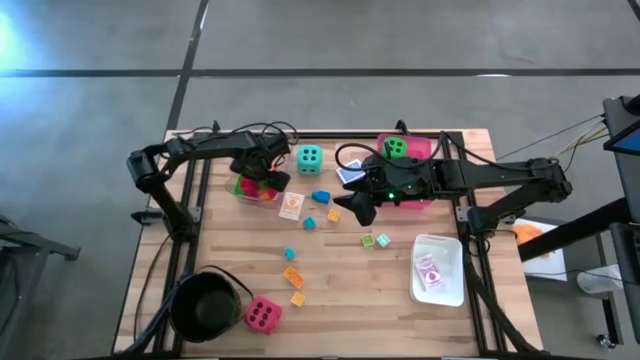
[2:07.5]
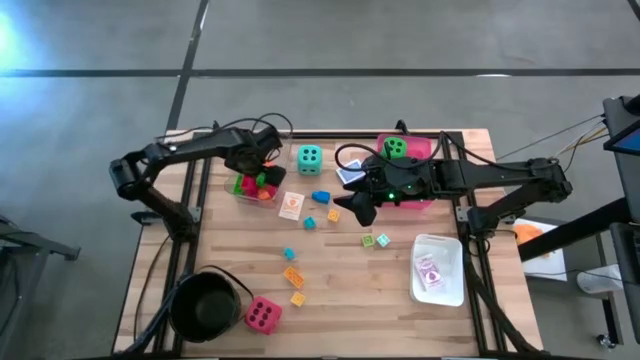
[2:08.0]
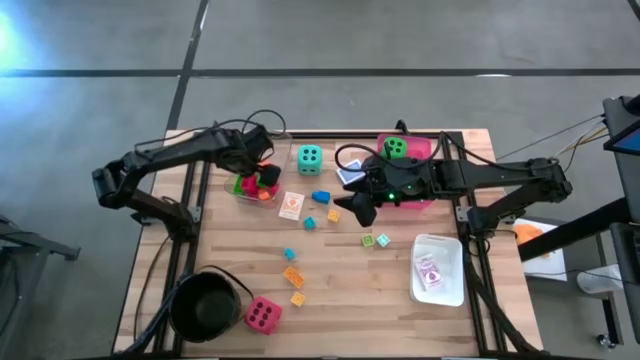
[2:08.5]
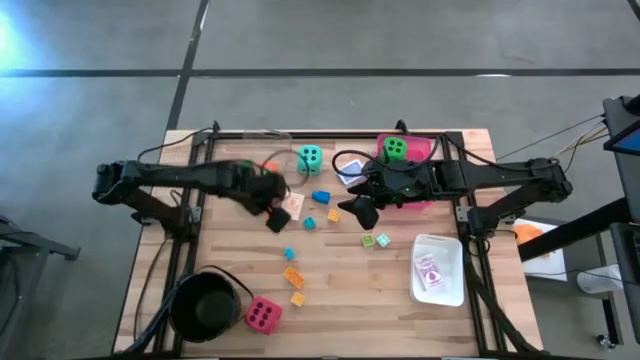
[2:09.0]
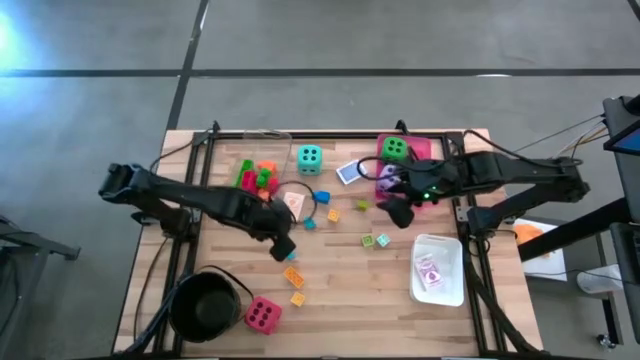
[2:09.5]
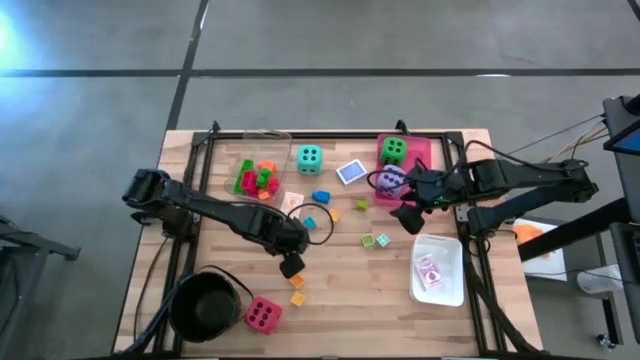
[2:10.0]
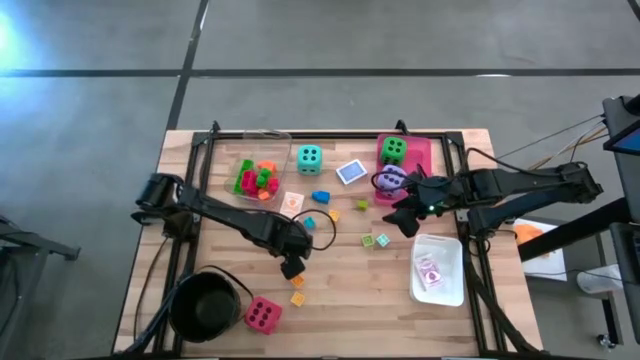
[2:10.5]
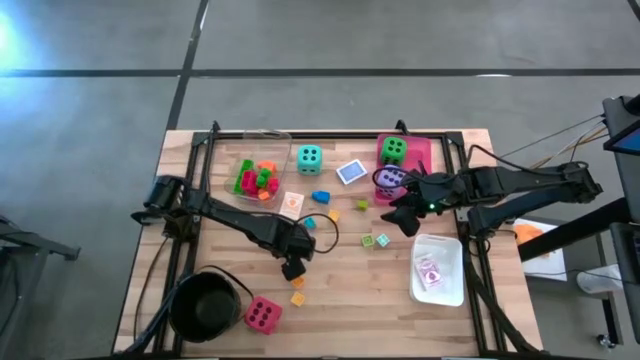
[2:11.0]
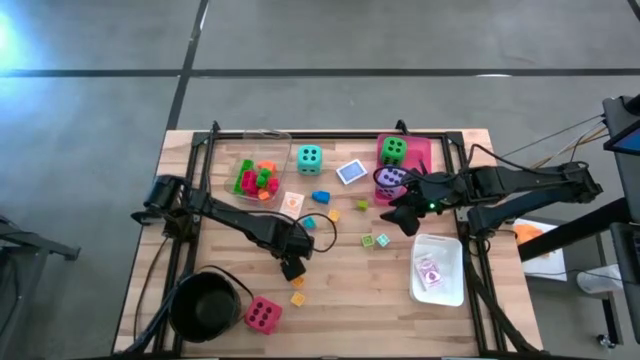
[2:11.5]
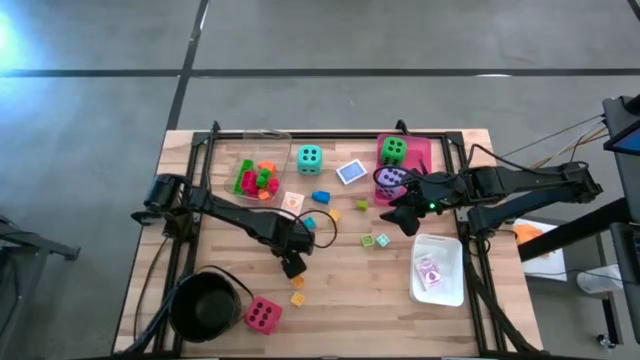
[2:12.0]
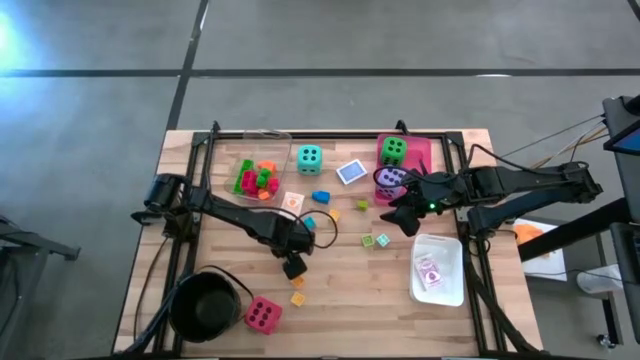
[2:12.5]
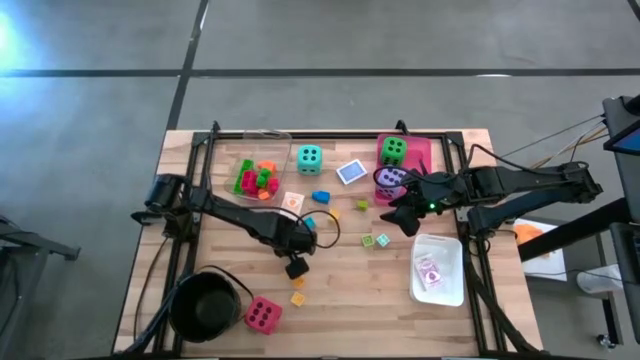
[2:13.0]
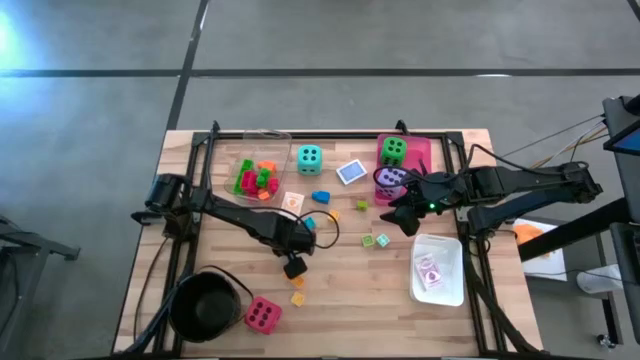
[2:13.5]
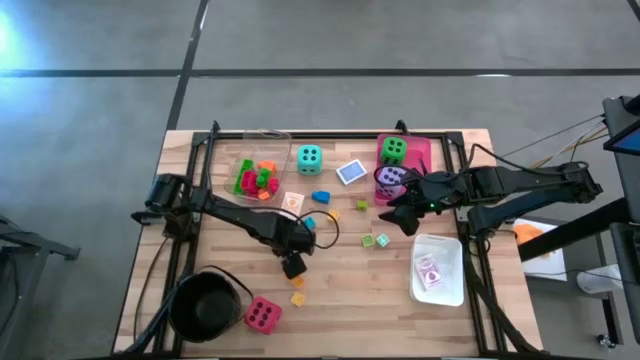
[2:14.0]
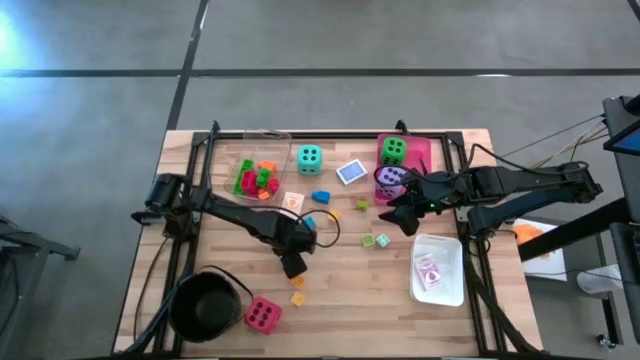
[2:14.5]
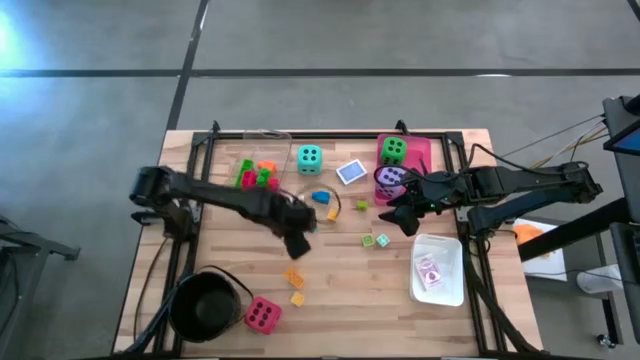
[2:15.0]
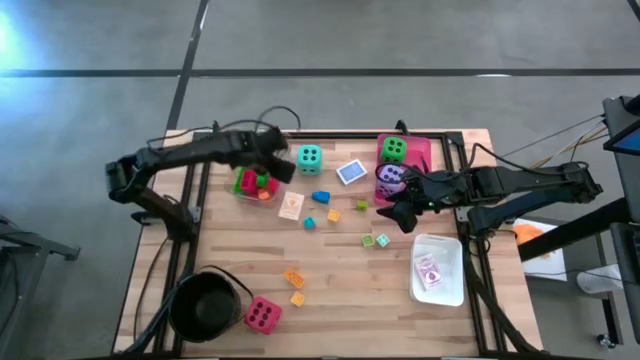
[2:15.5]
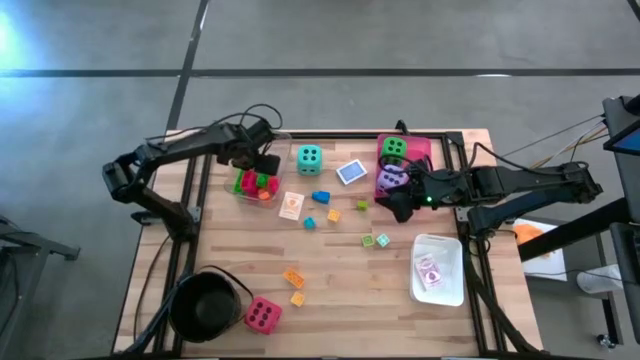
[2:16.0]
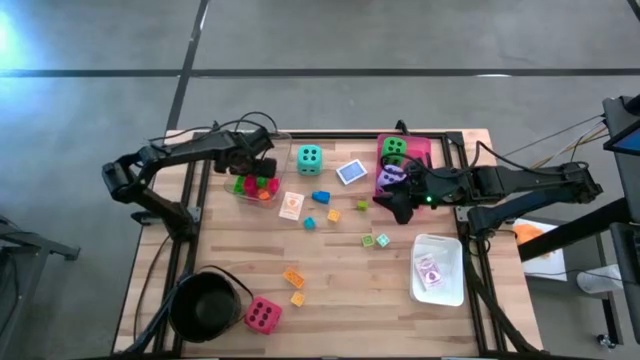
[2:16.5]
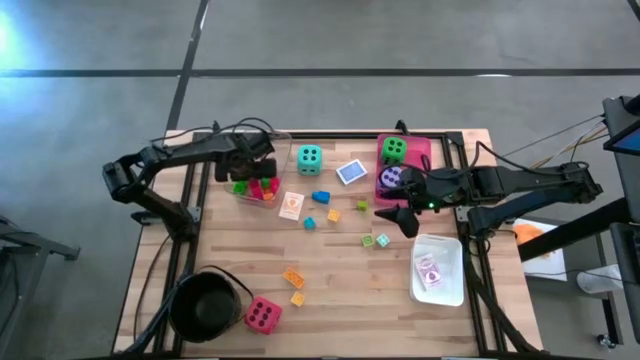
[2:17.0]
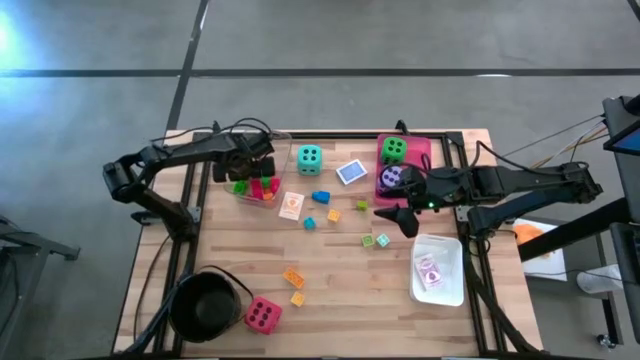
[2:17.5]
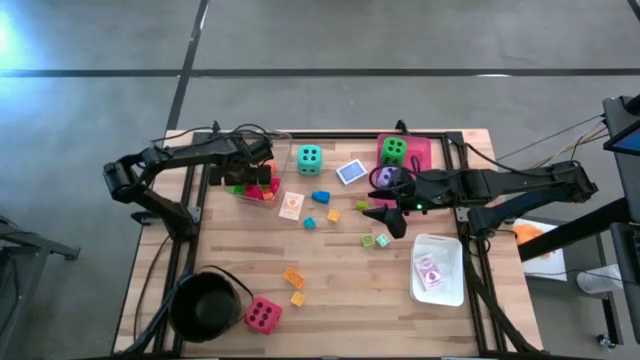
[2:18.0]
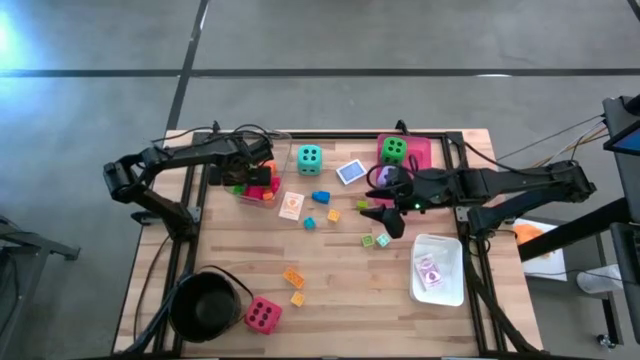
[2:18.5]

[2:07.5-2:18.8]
Task: Pick & Place Toys
Put the light blue game piece into the transparent bin

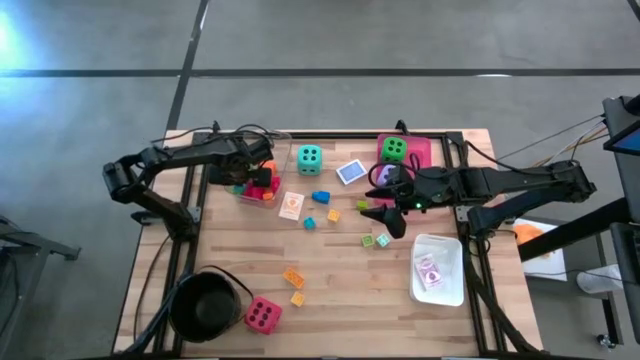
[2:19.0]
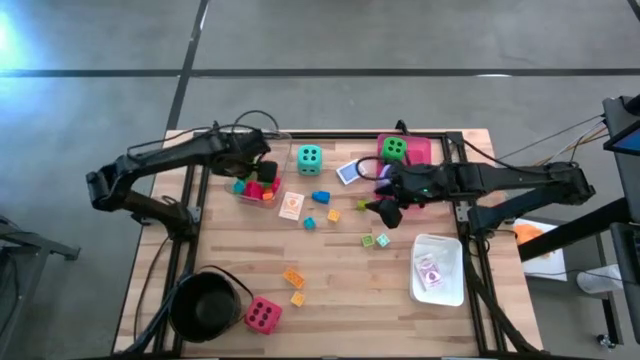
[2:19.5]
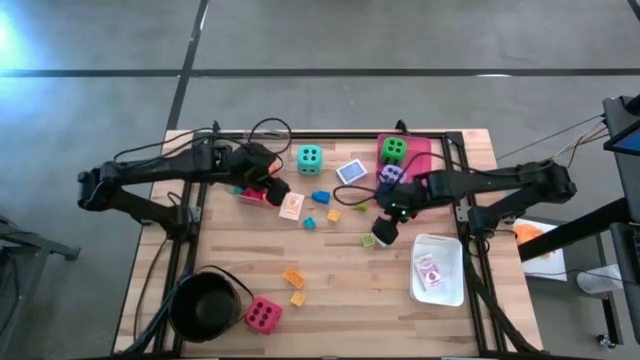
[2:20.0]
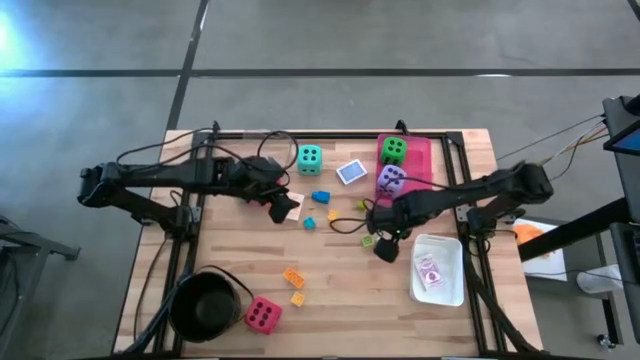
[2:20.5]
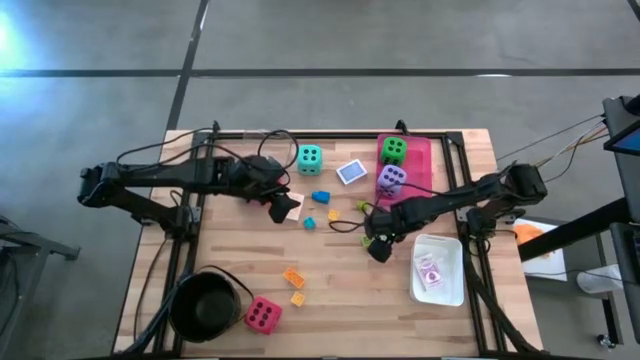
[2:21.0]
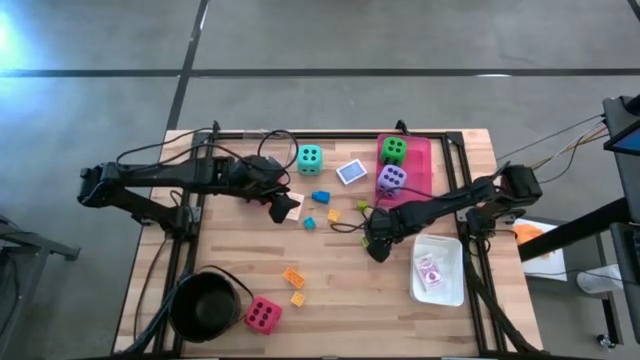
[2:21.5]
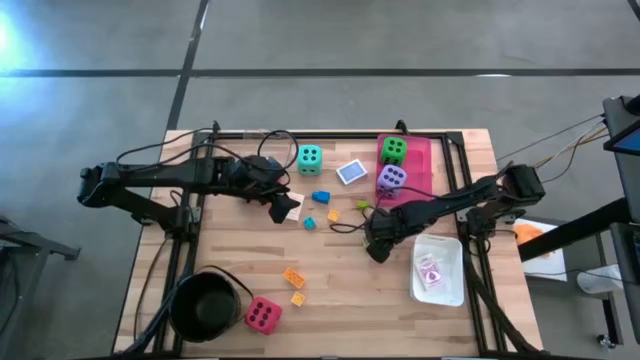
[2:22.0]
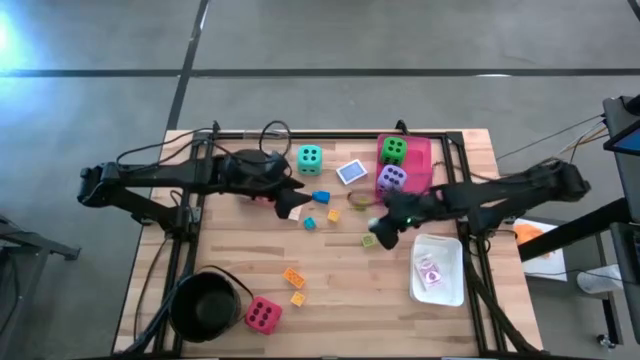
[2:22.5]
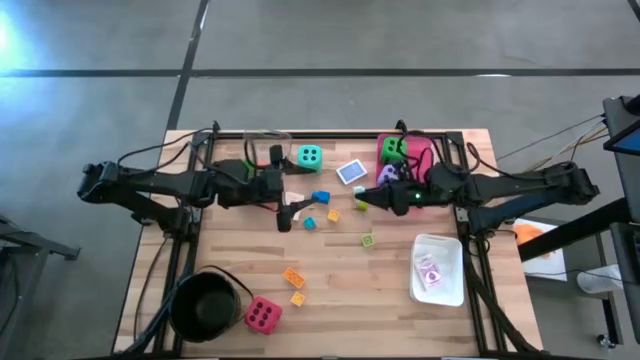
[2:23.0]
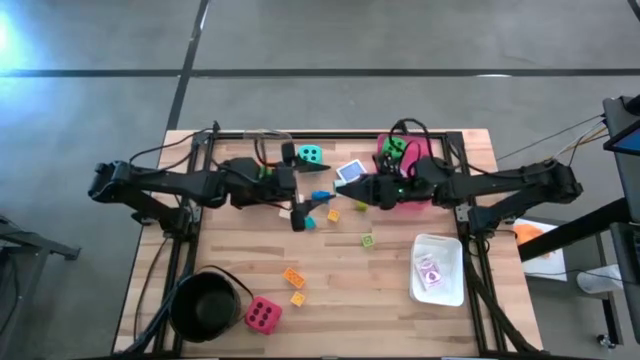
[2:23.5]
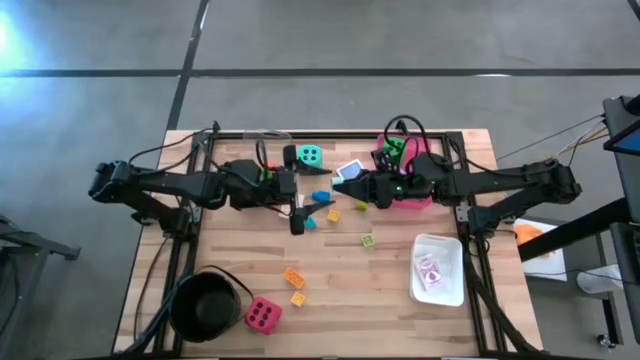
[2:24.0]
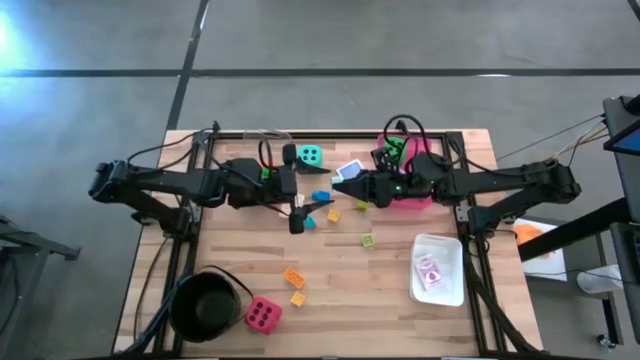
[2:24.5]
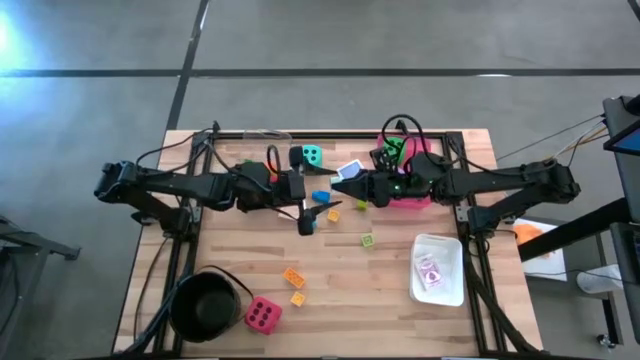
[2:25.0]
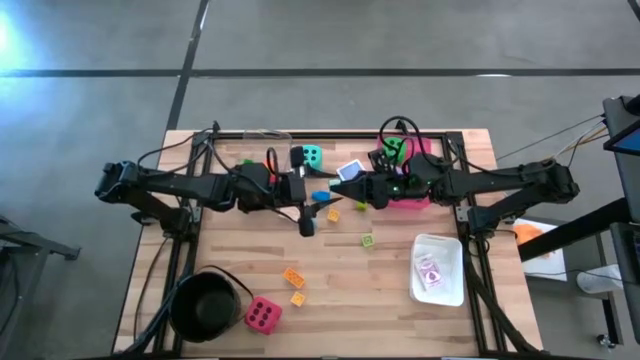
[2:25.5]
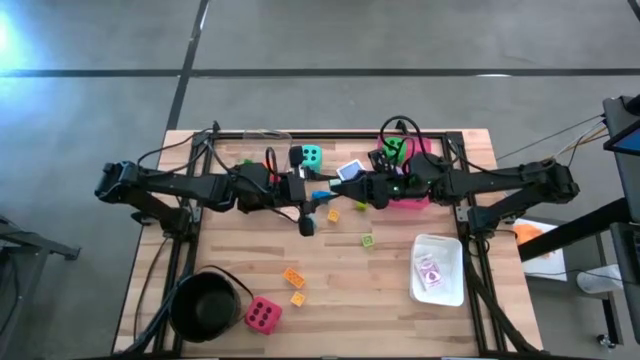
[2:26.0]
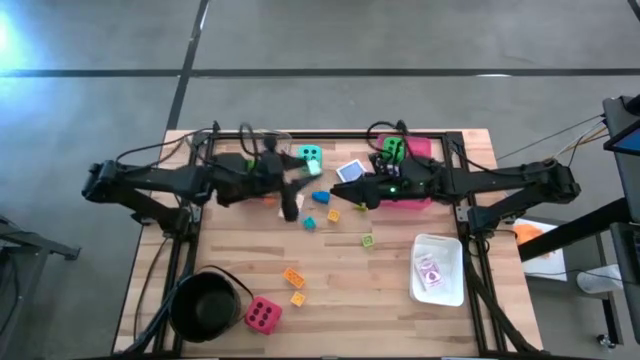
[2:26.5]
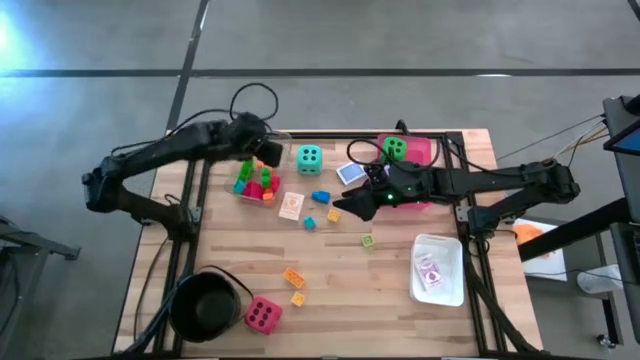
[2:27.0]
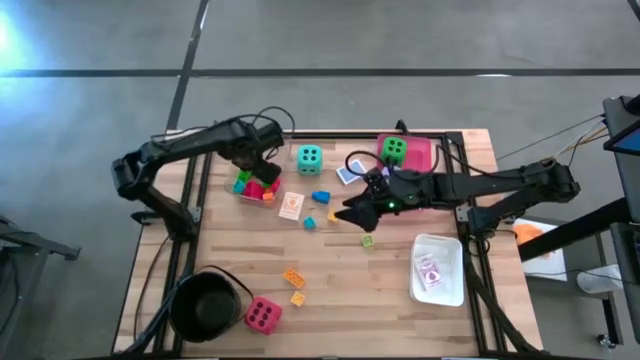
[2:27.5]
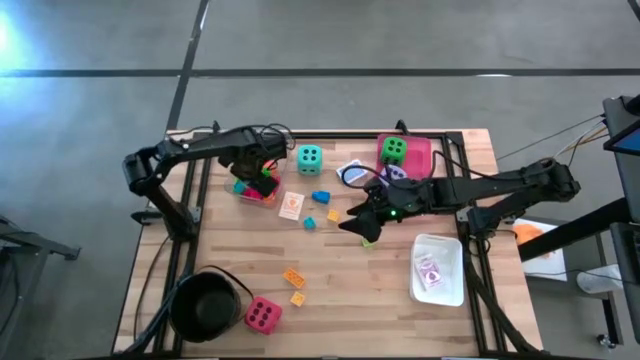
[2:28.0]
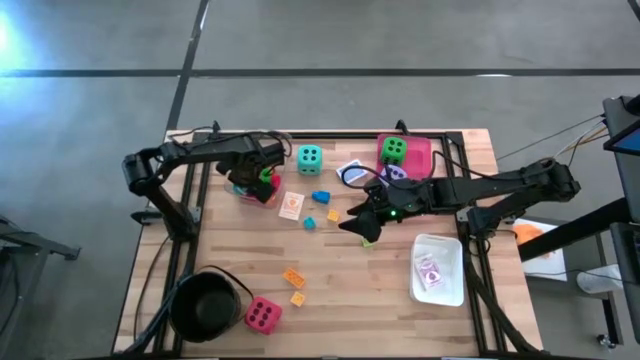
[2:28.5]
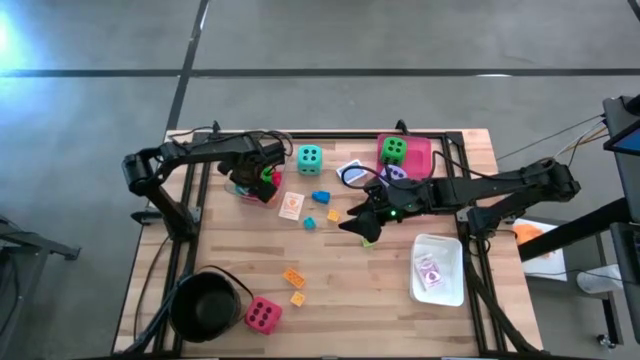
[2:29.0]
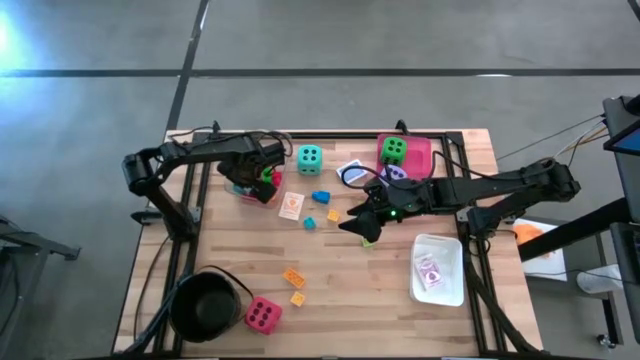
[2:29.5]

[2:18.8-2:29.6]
Put the light blue game piece into the transparent bin
